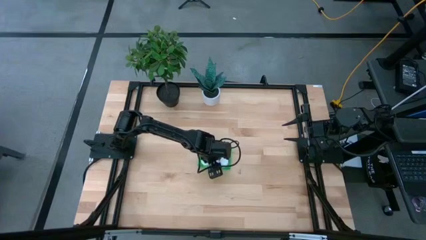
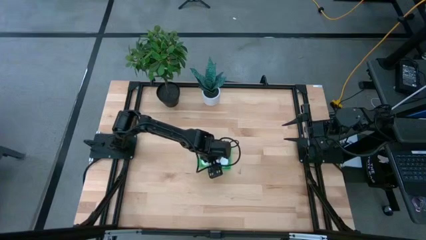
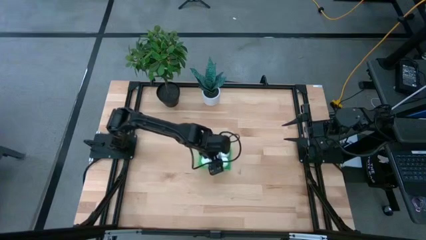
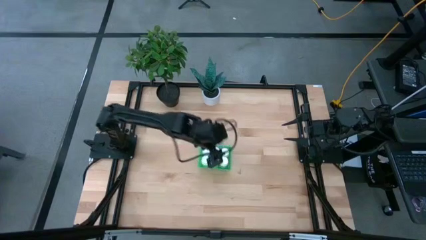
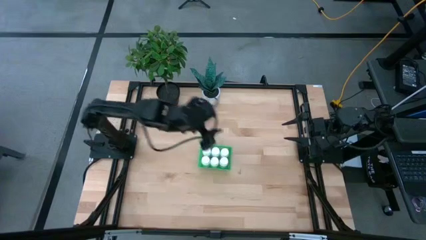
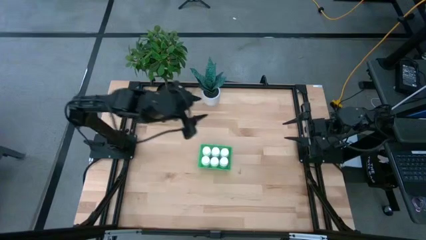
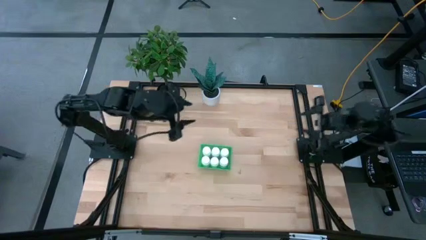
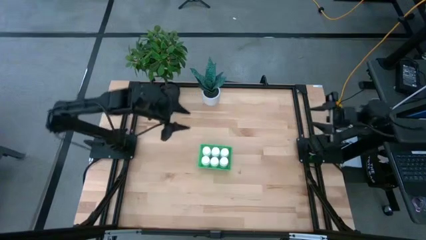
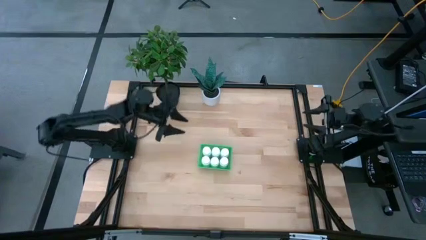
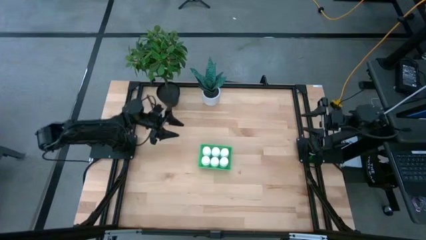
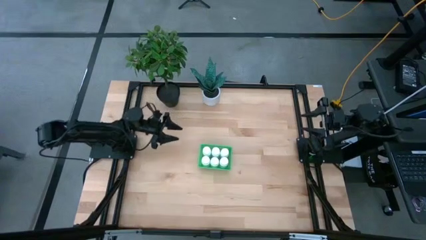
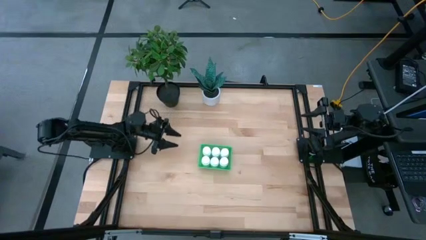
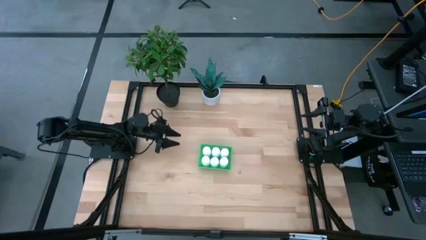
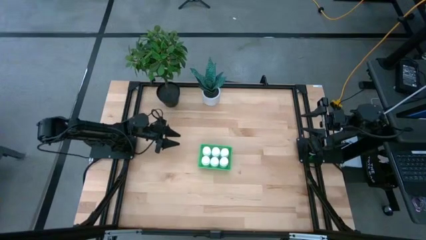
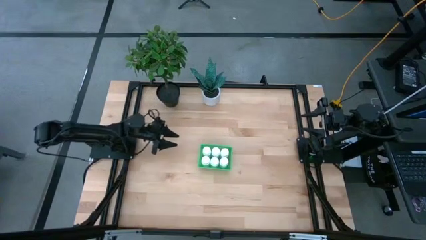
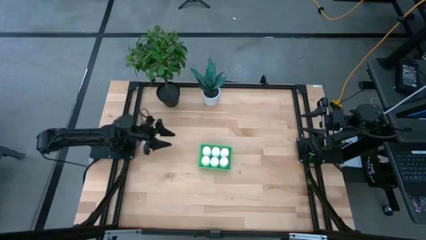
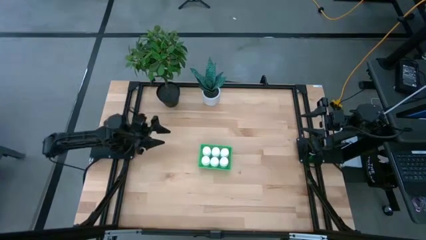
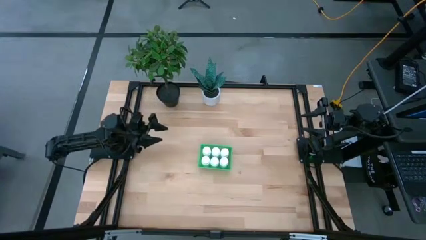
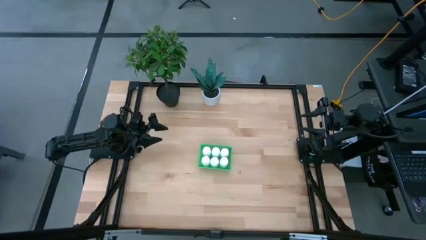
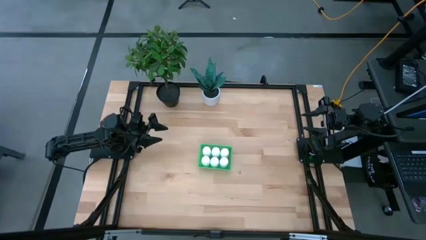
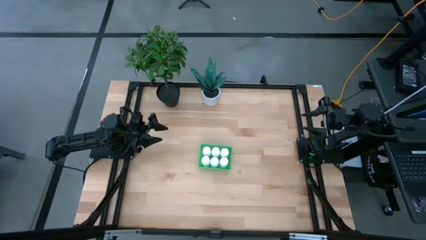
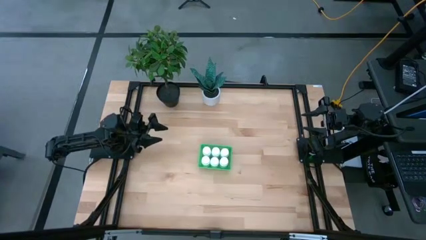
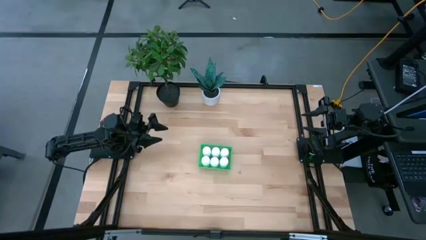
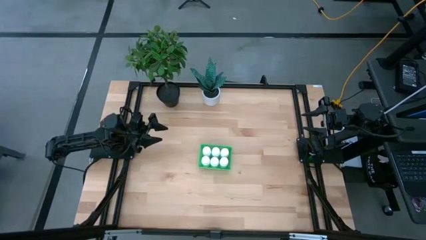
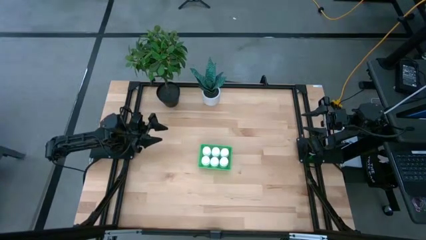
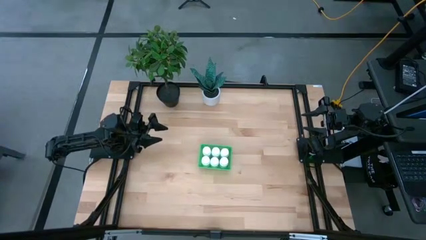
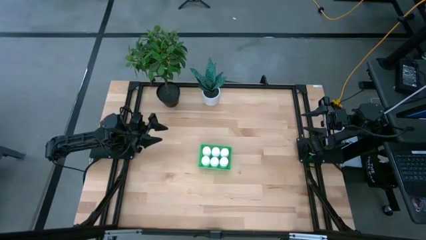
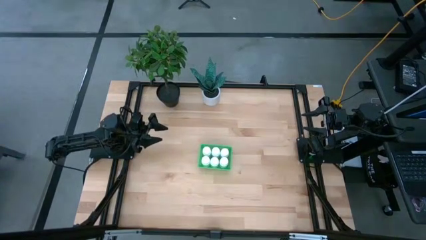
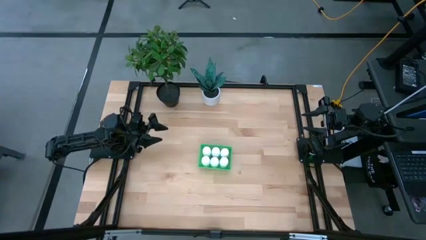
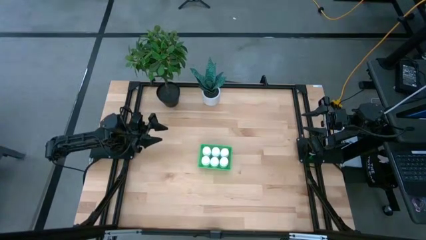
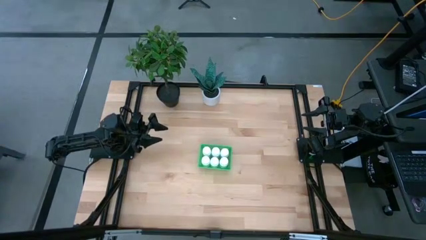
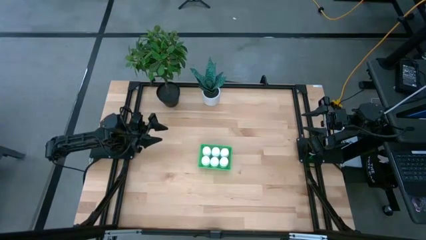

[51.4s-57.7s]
Task: Pick and place pill bottles into a basket
Return to Home Position

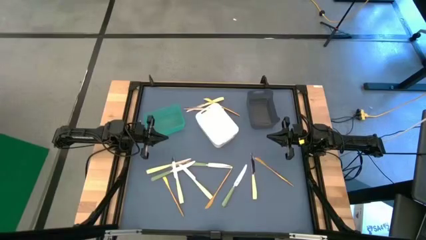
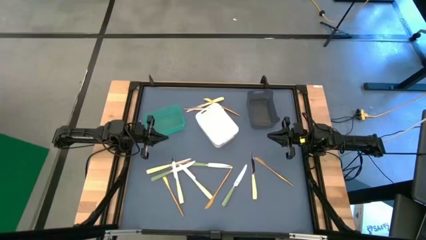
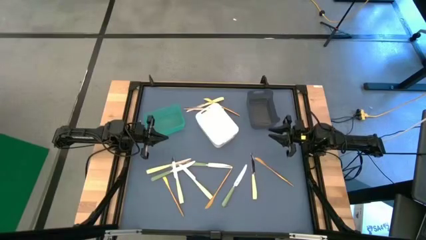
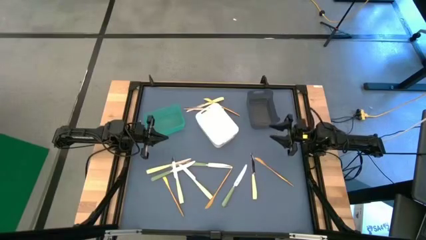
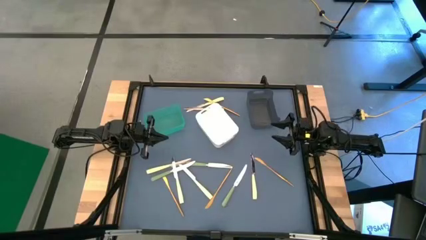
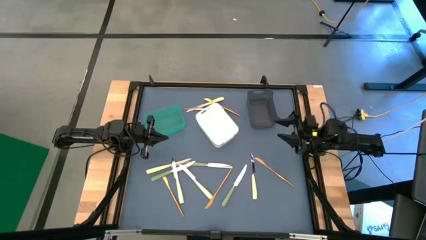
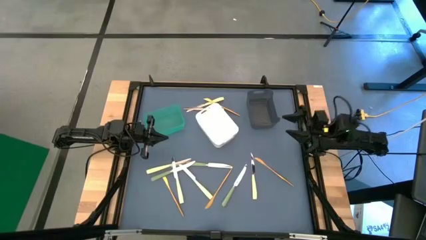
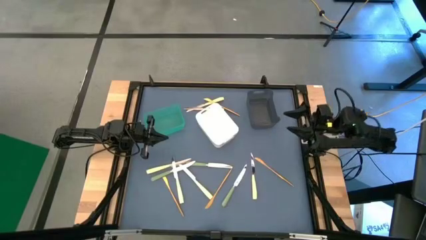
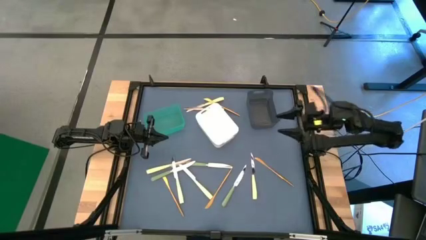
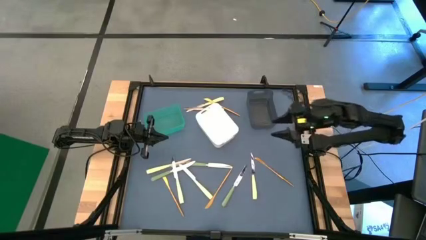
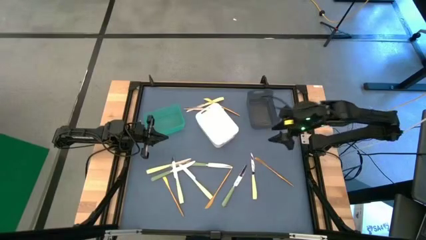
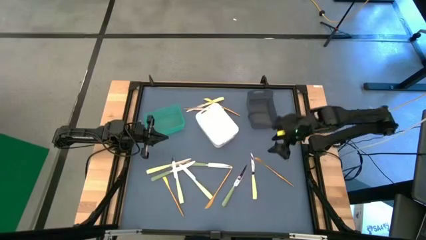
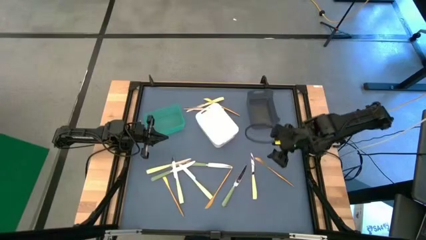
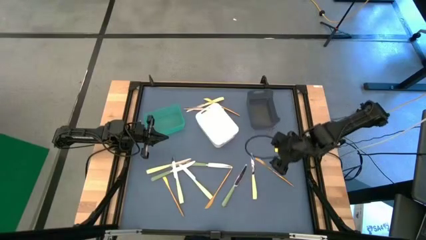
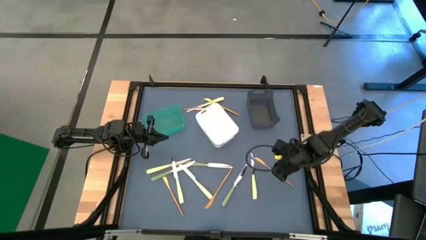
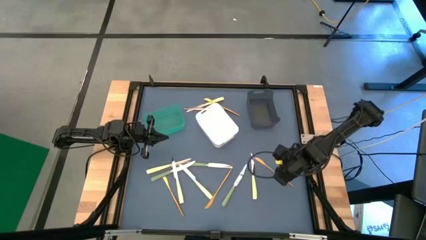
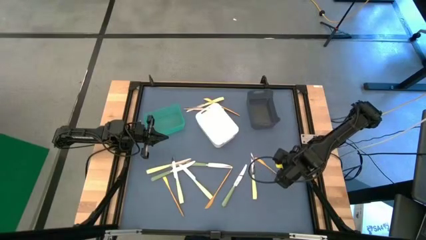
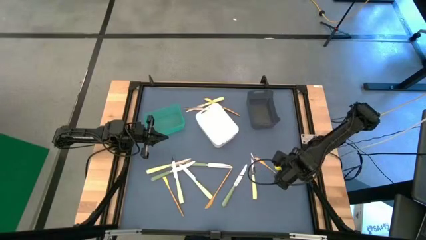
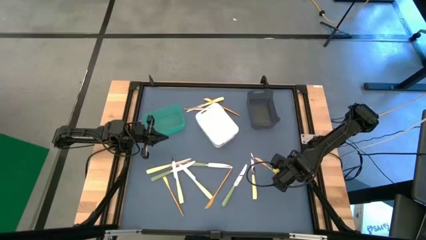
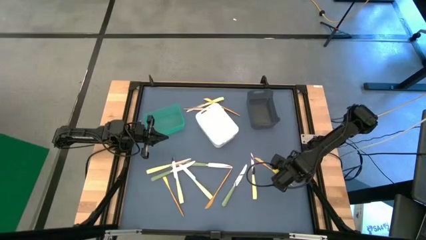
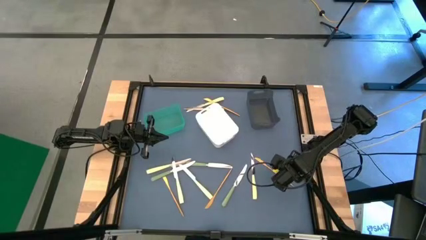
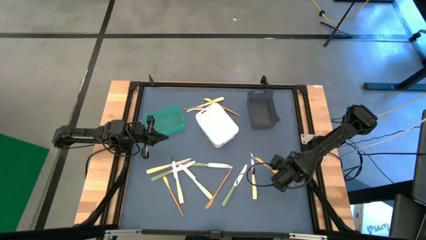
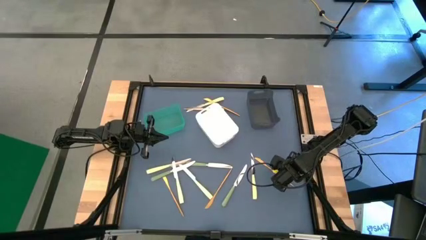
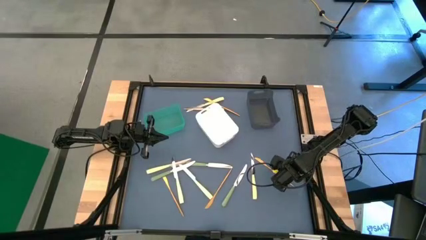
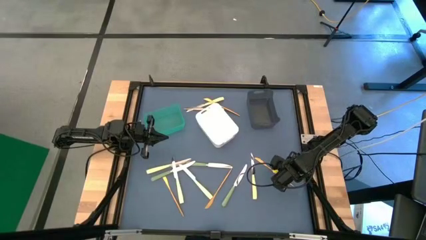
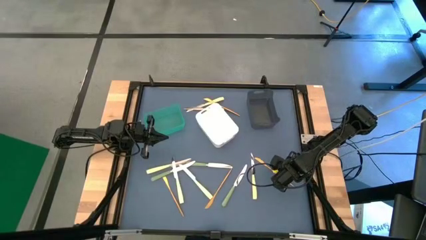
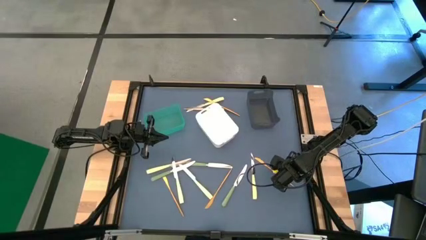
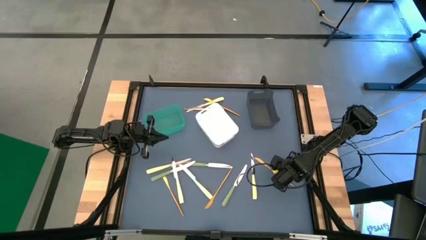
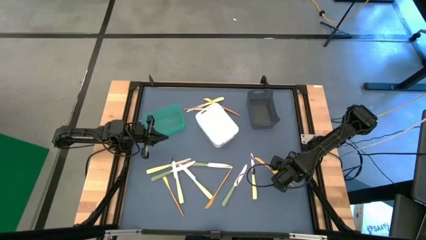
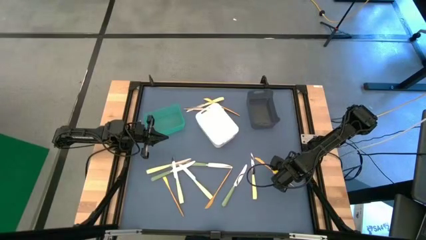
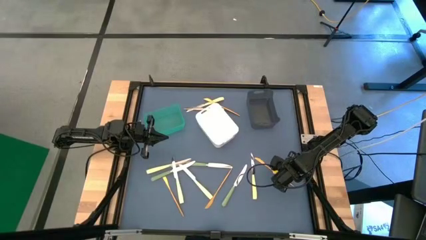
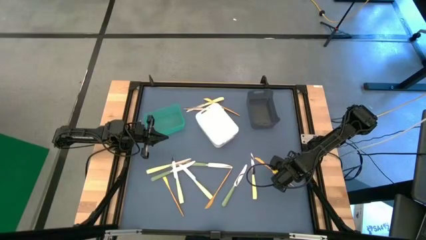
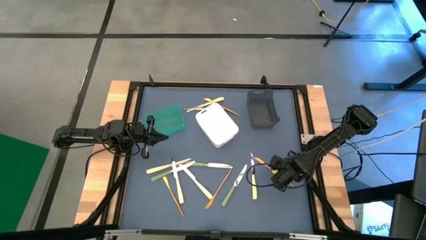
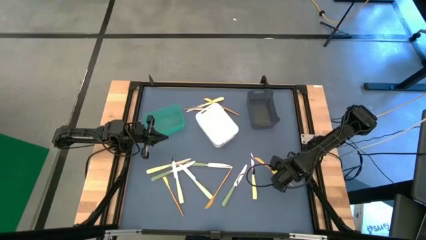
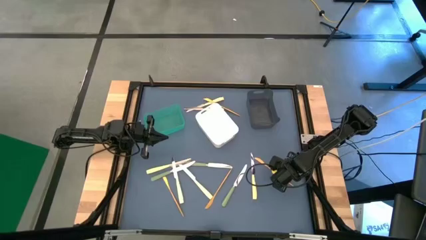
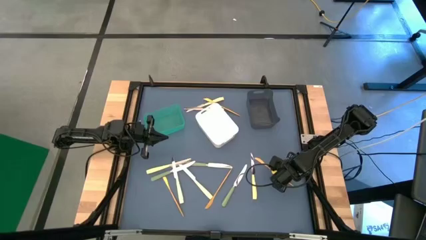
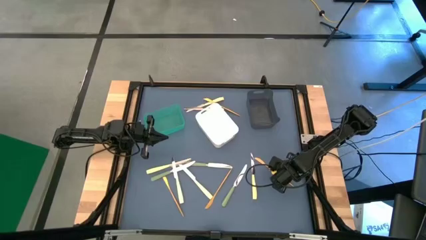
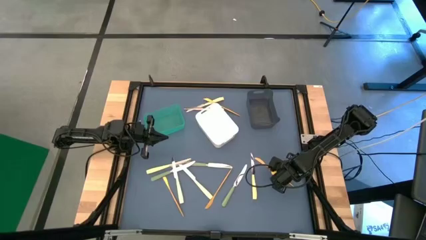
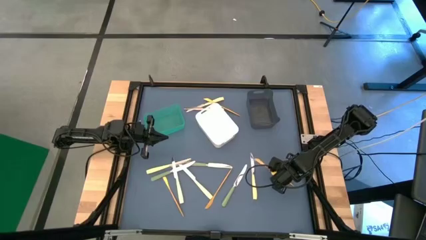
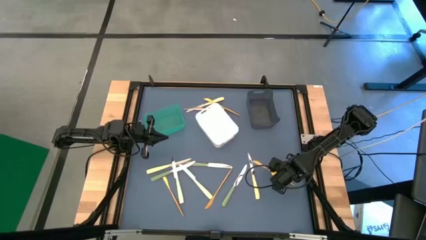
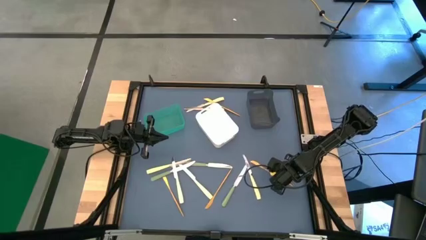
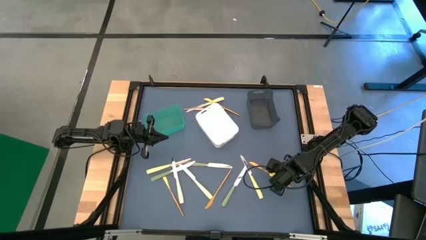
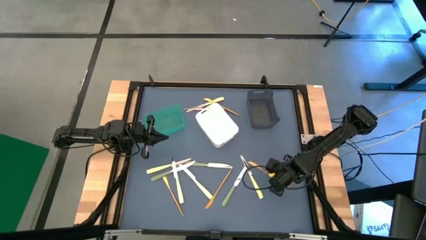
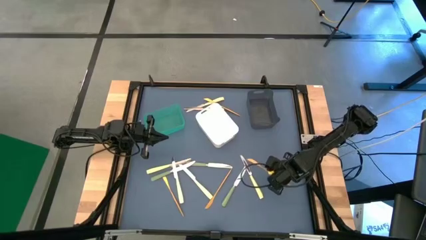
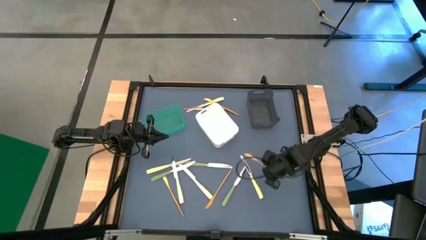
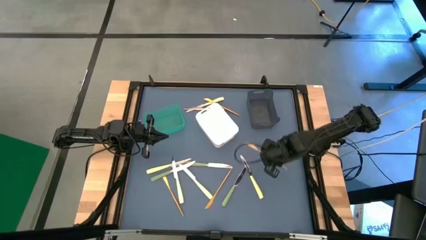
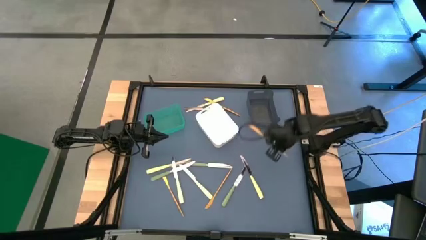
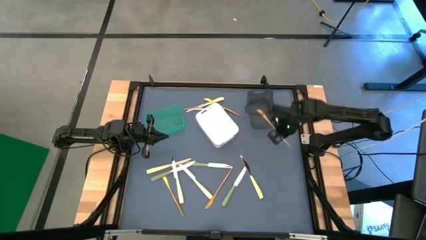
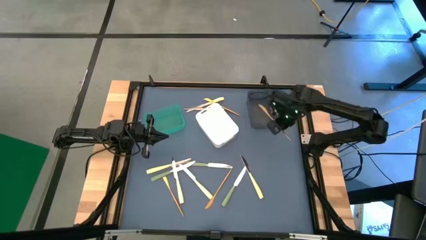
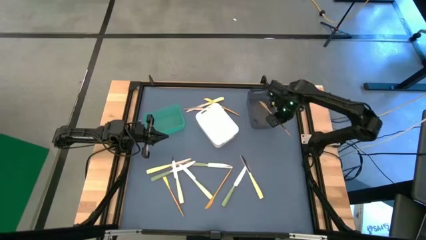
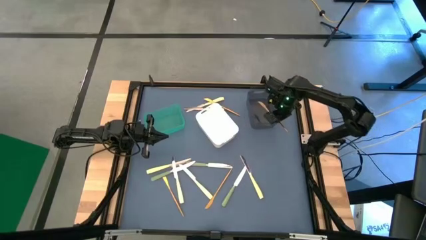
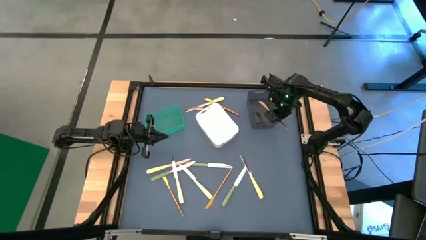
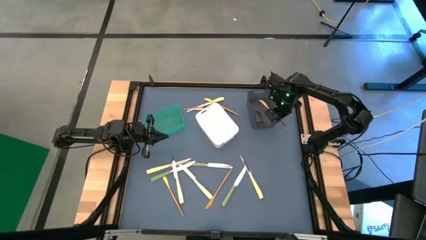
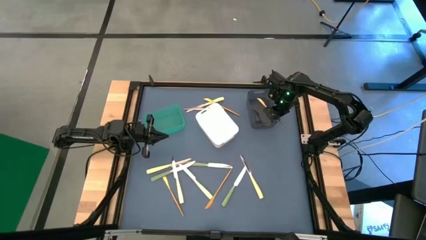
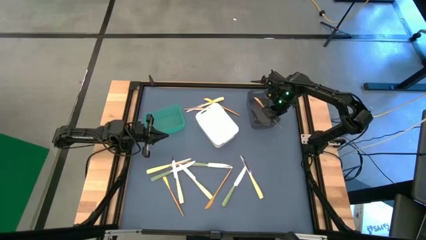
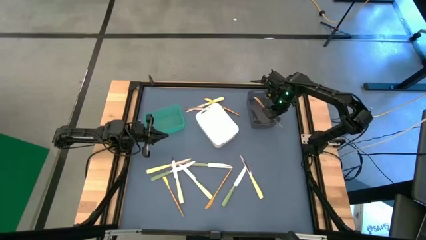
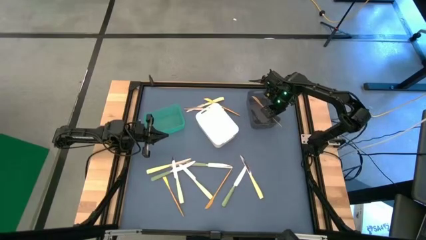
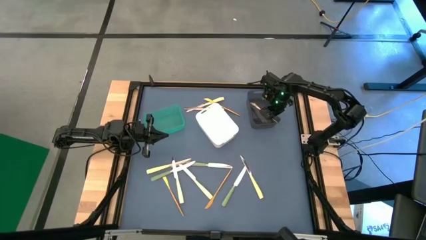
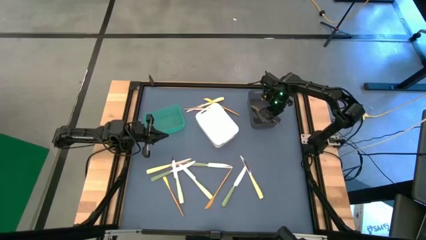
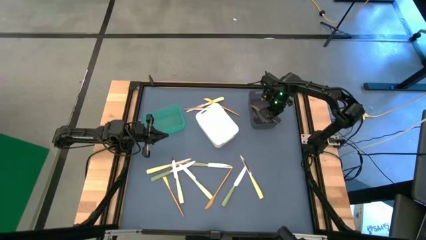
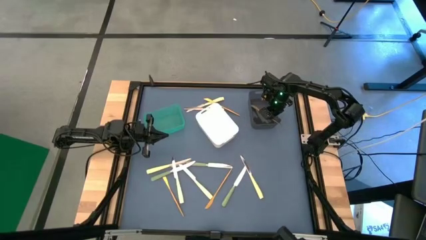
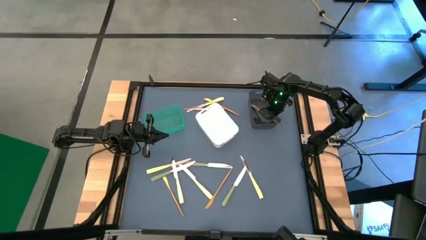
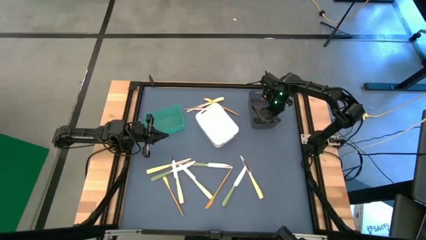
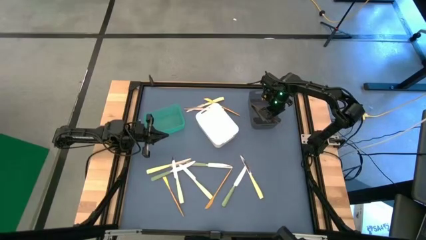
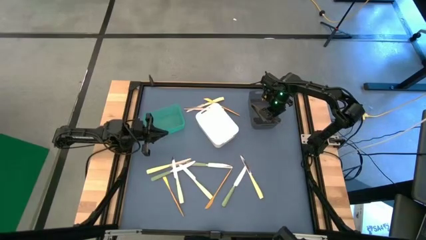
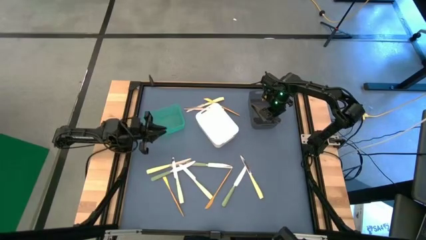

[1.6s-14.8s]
Task: Sort silverware by color (type)
Put the right gold table knife into the black bin
